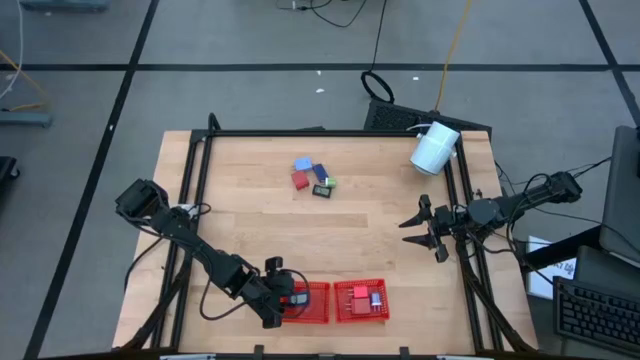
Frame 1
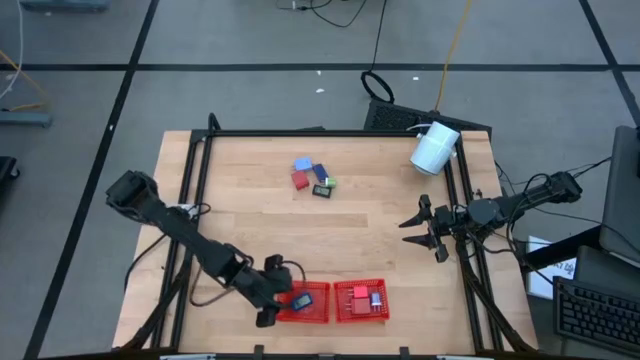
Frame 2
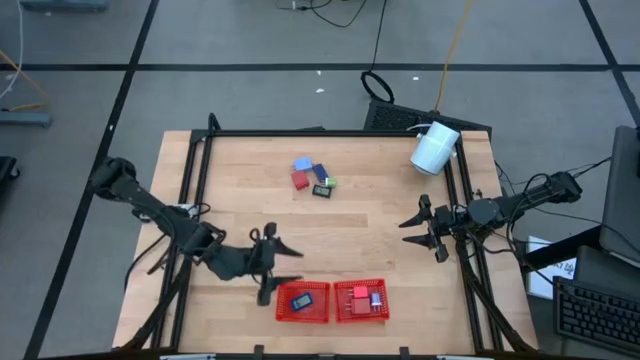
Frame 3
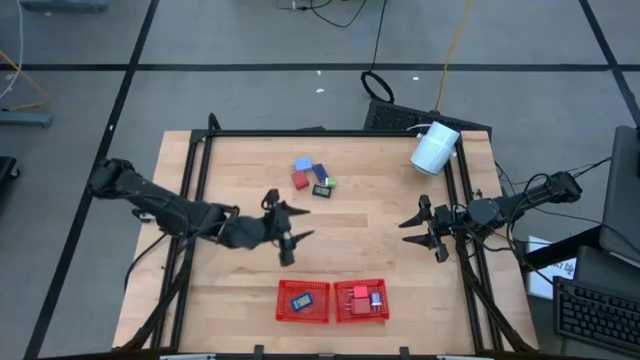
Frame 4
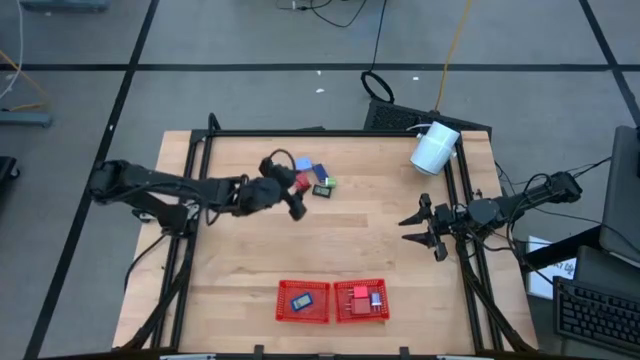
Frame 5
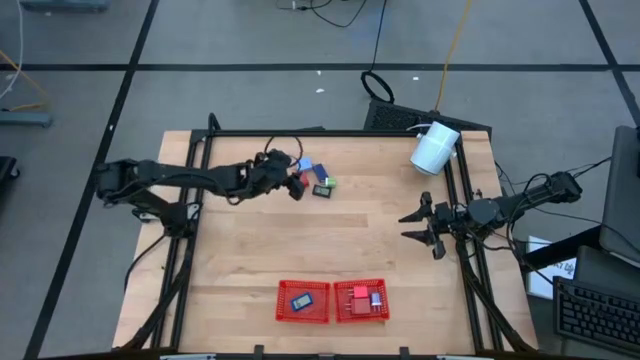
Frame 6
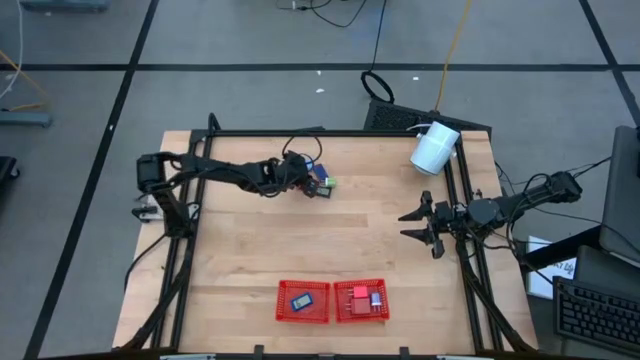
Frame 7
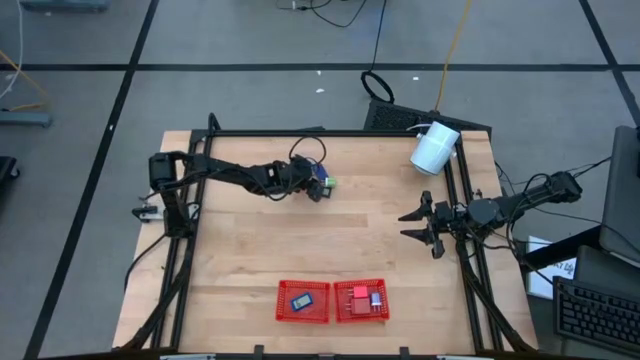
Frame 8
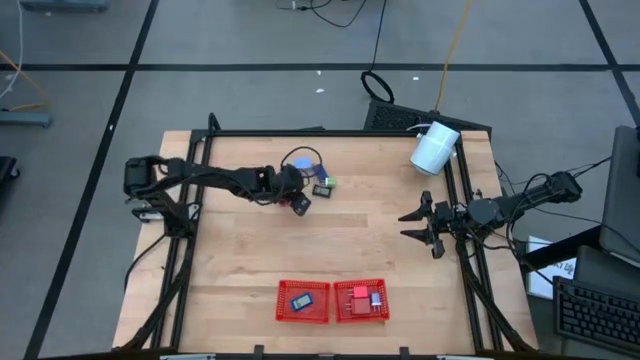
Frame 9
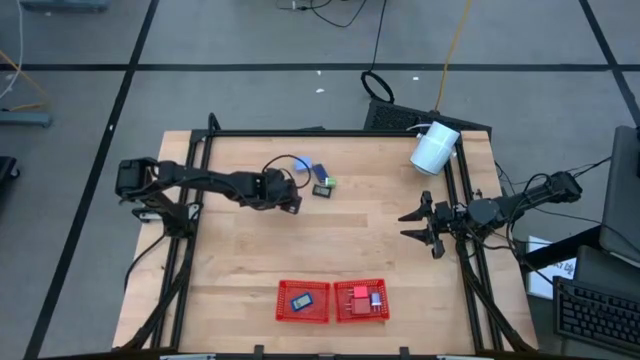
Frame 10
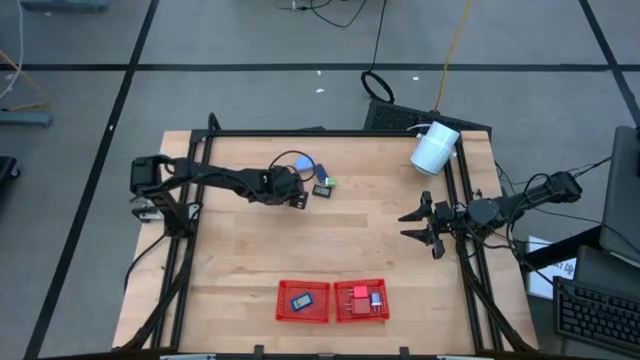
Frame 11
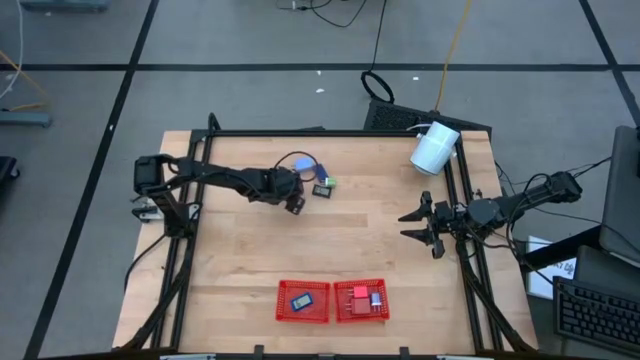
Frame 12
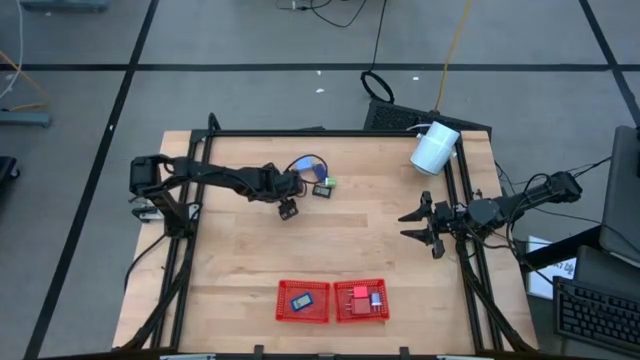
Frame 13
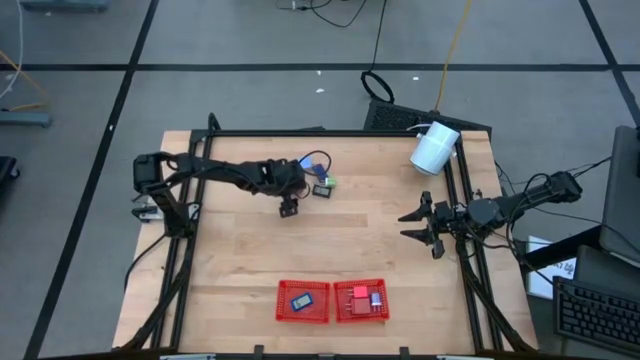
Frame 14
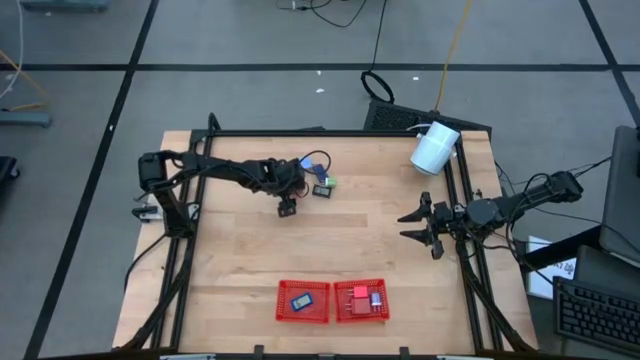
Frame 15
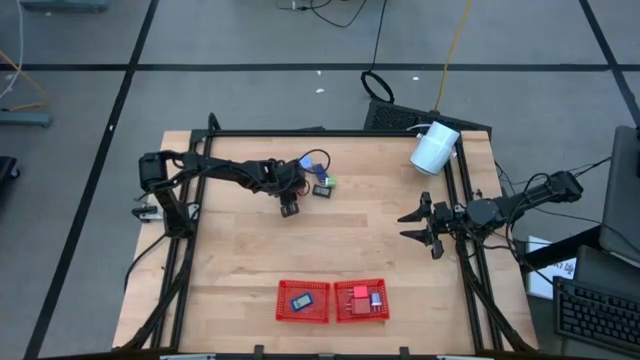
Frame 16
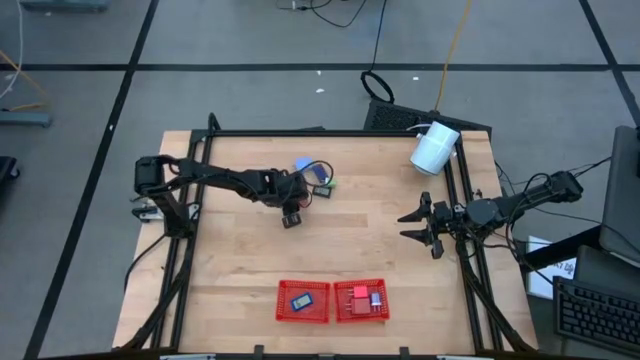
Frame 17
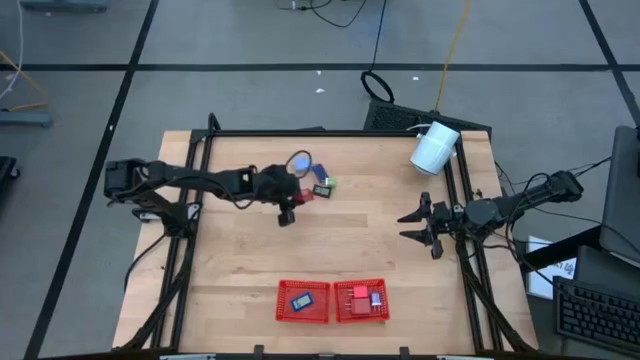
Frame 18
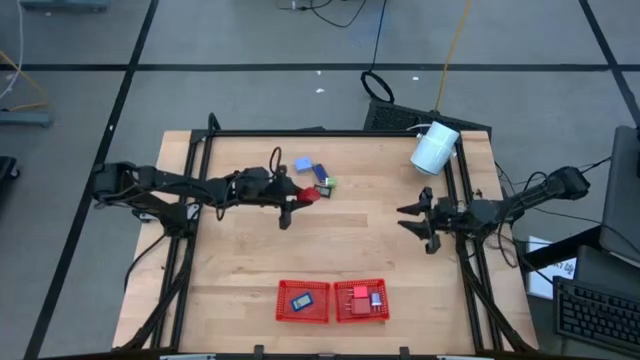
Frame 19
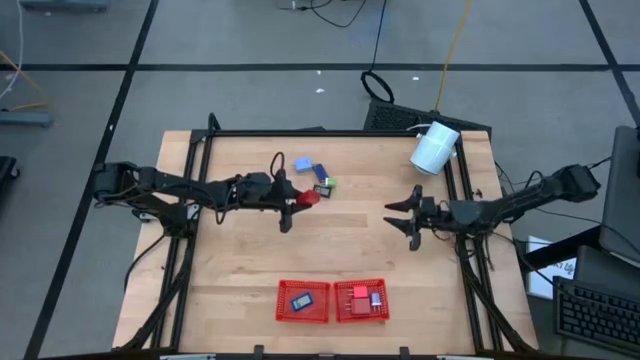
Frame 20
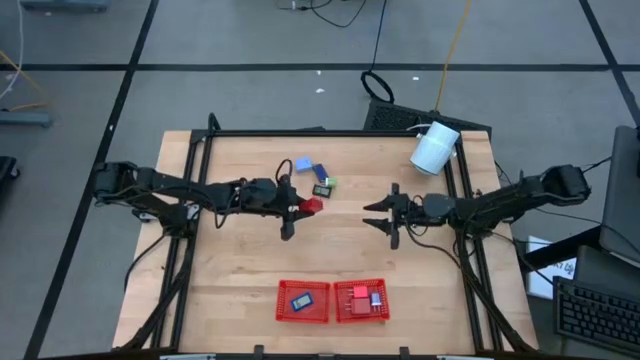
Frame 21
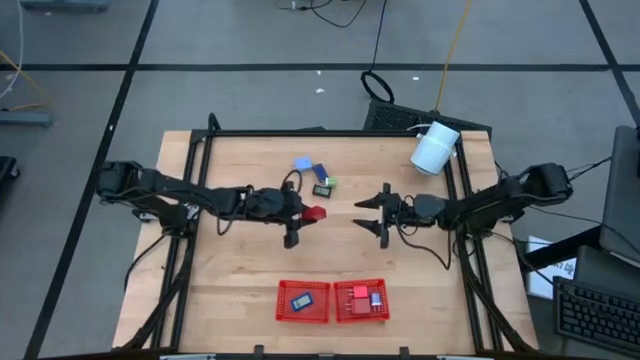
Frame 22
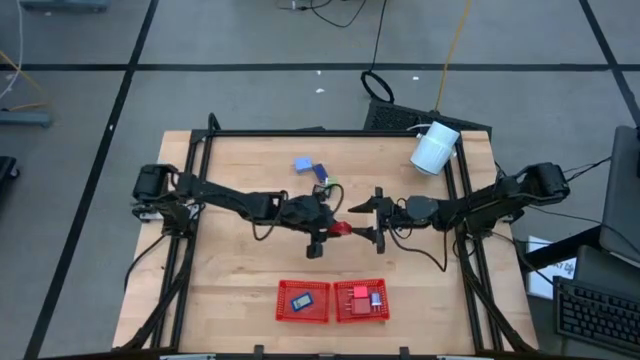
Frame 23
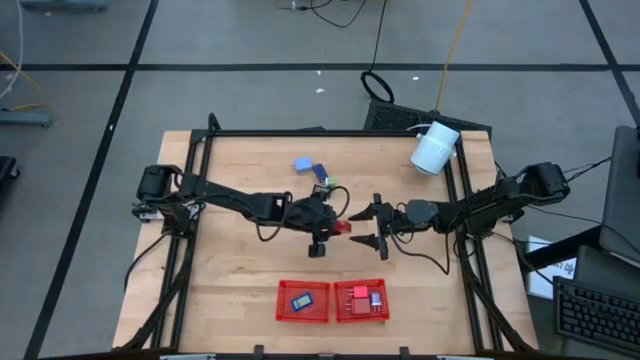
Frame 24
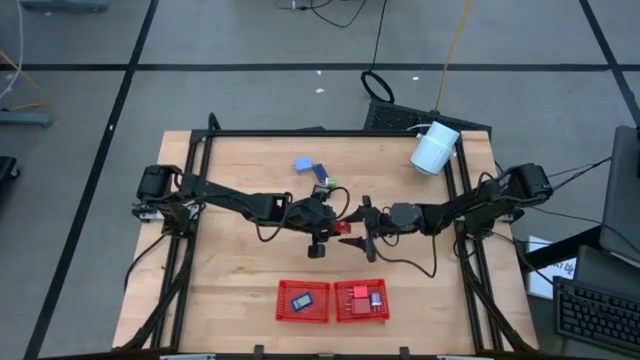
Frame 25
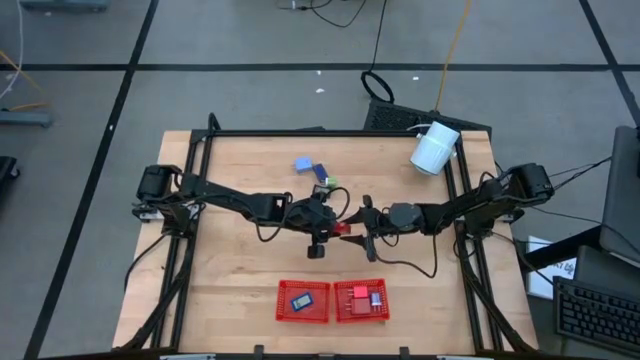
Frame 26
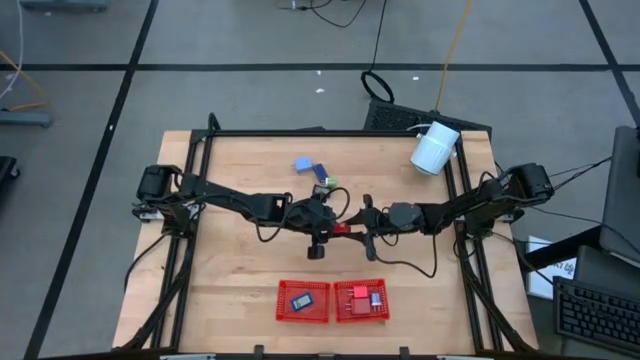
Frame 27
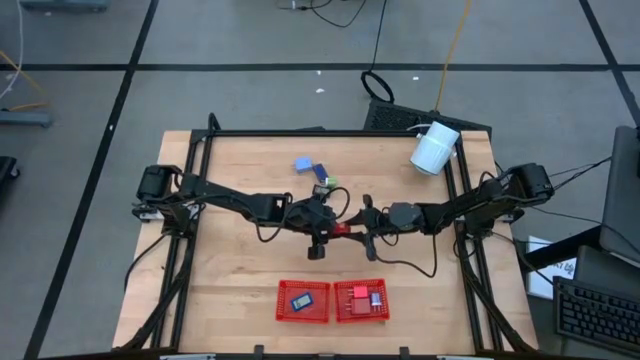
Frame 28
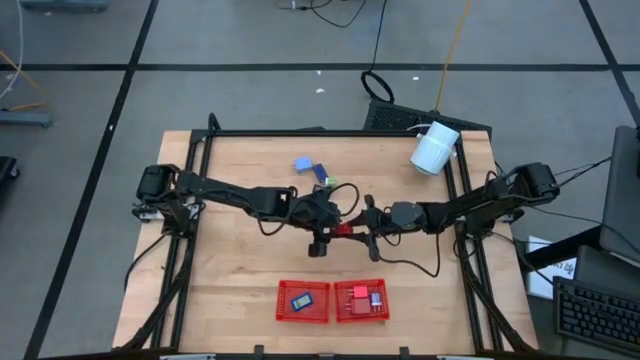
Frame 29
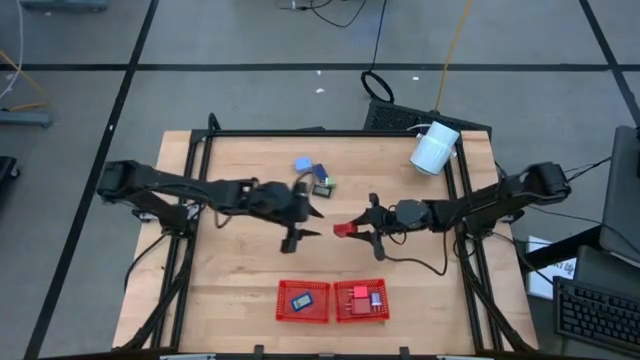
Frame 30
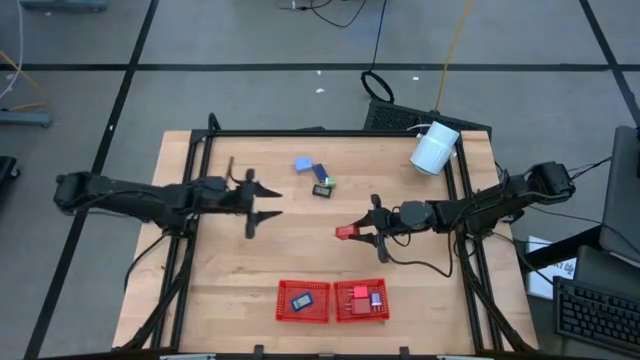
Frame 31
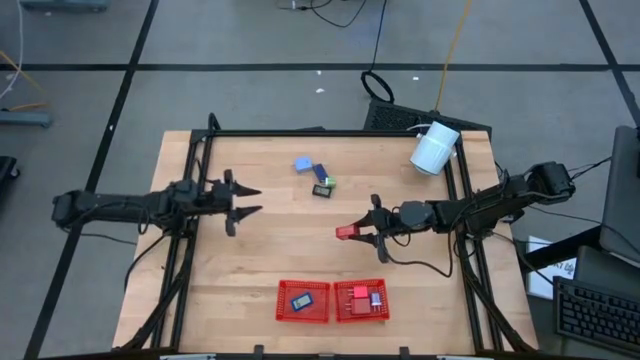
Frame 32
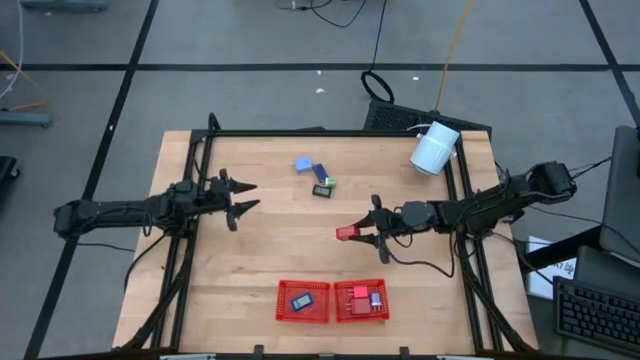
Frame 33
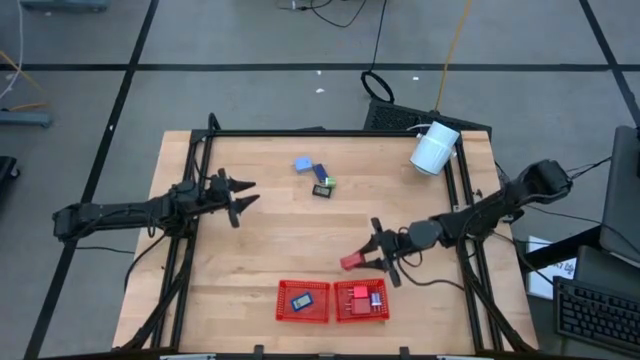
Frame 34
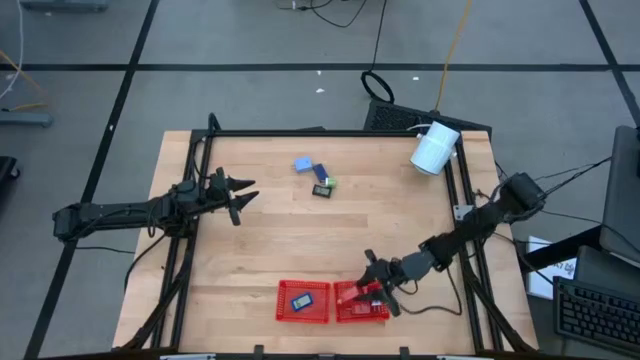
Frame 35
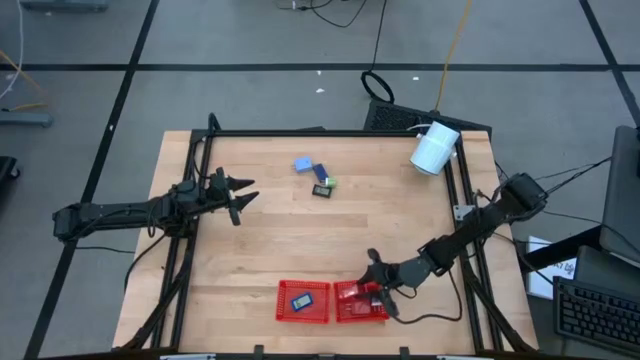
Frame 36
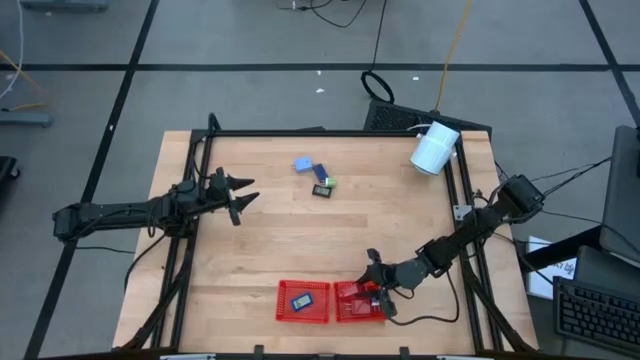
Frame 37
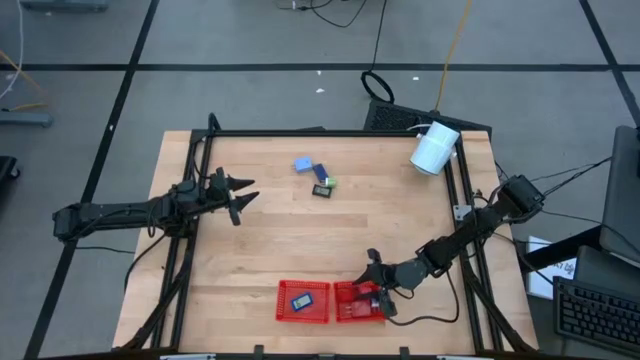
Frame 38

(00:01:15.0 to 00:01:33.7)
Task: Pick & Place Office items
Put the red charger adapter into the right red bin

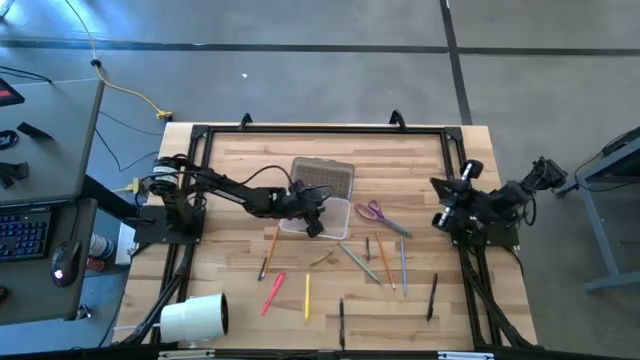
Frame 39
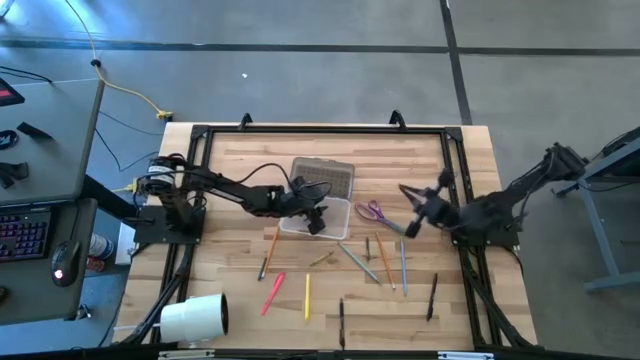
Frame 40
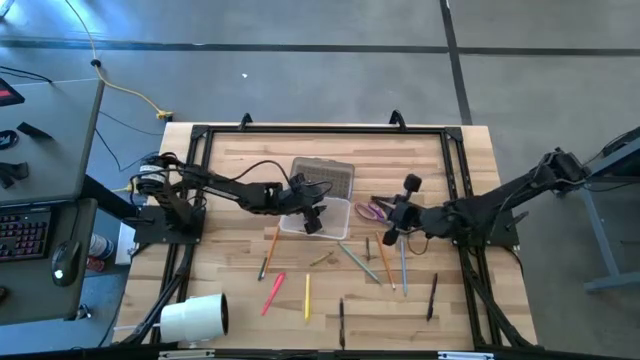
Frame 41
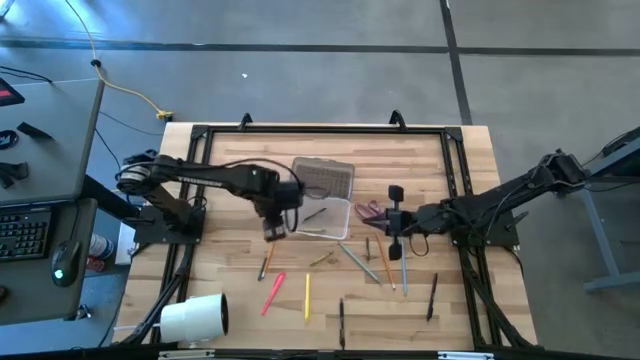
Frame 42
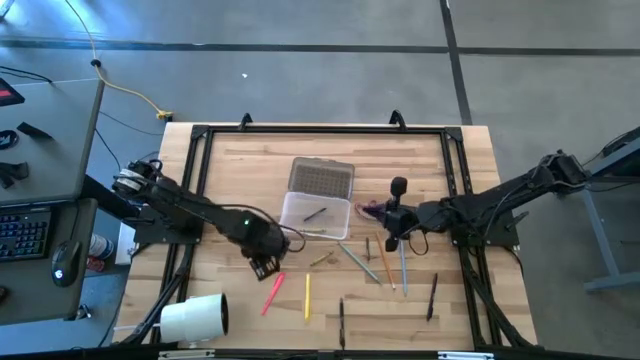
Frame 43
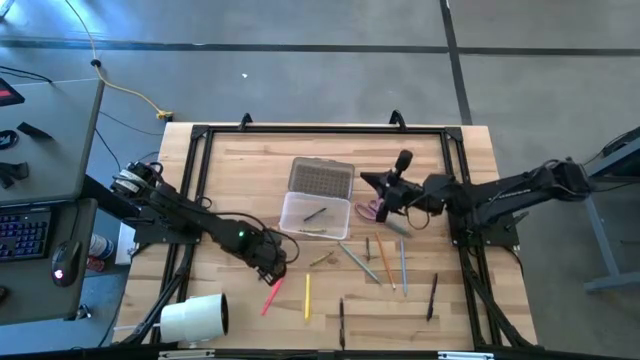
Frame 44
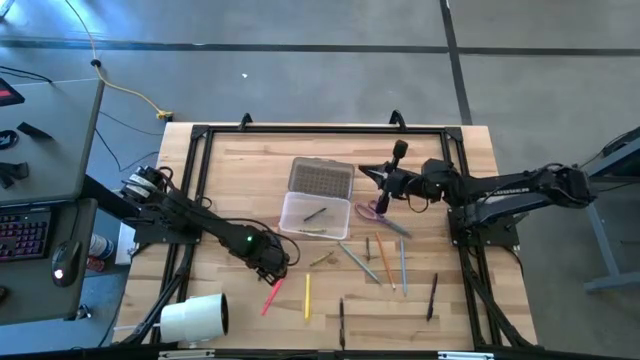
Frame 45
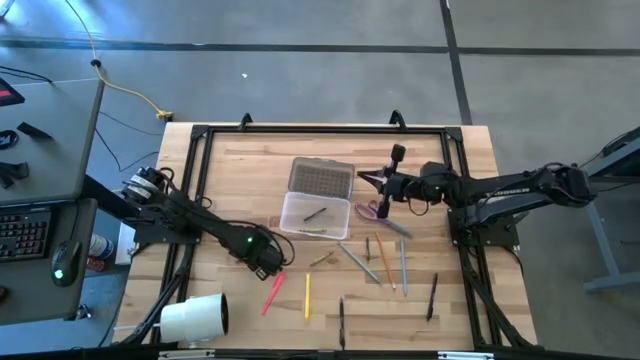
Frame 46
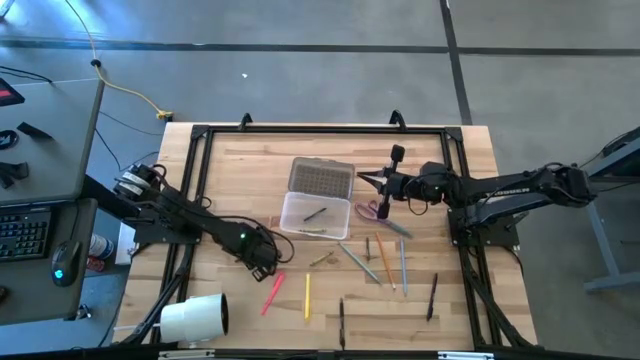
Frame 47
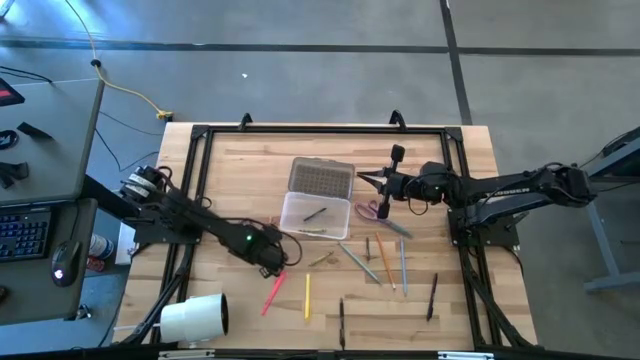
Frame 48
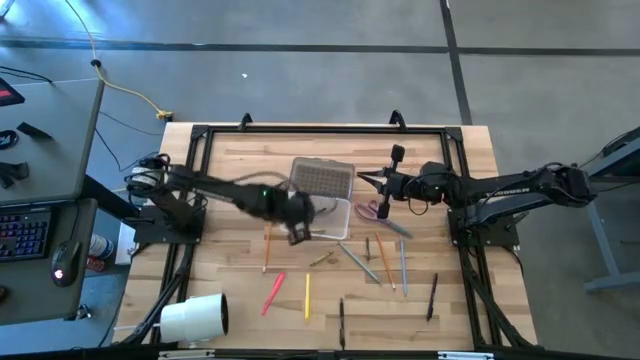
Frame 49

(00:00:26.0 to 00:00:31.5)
Task: Pick & place school supplies into a supply box
Put the green crayon into the black supply box
